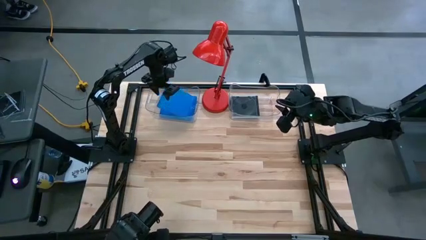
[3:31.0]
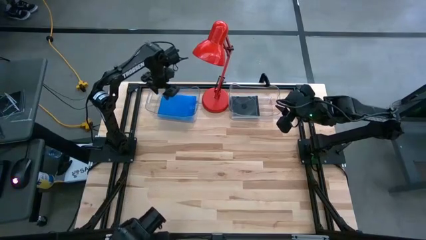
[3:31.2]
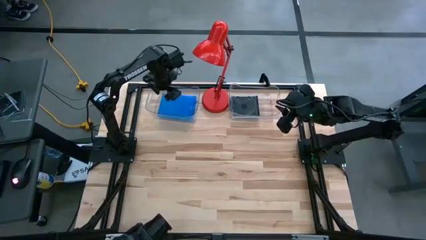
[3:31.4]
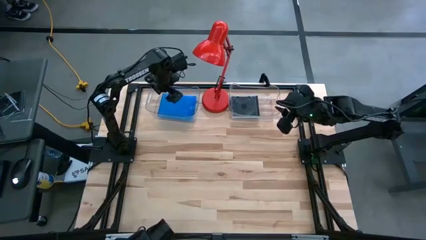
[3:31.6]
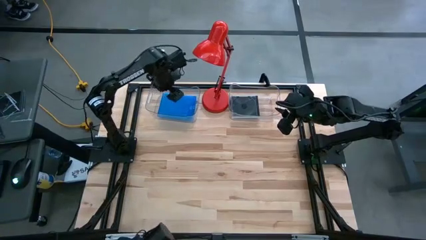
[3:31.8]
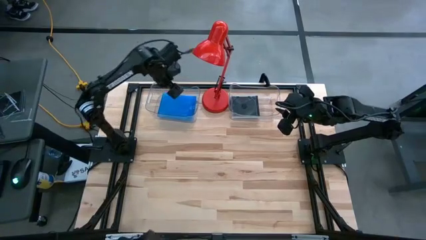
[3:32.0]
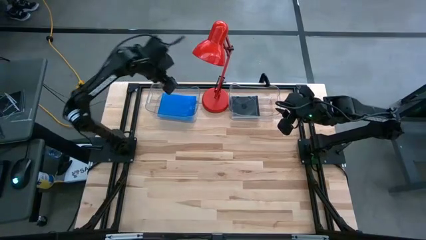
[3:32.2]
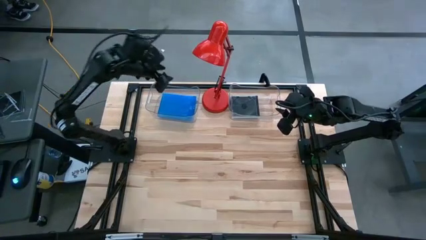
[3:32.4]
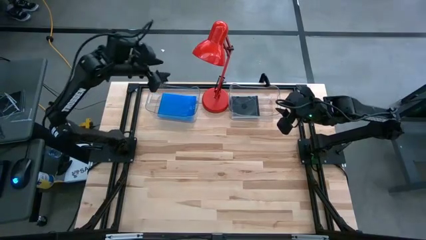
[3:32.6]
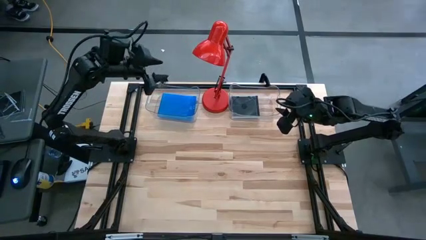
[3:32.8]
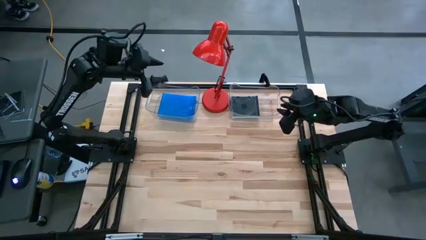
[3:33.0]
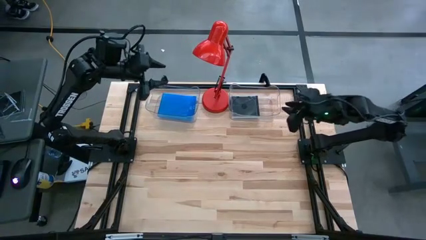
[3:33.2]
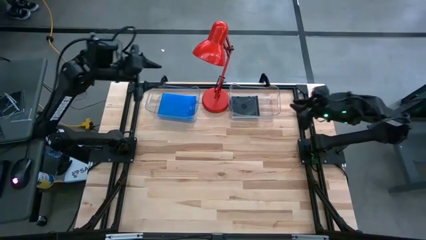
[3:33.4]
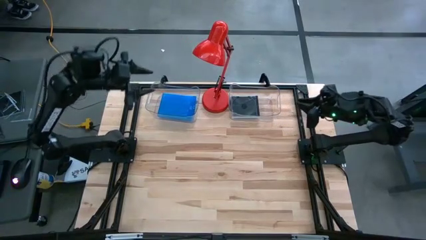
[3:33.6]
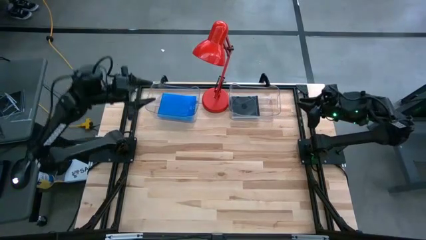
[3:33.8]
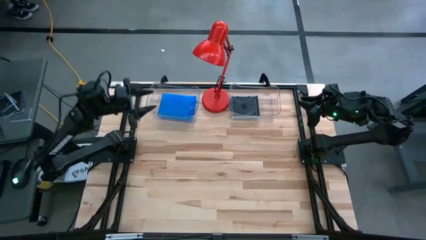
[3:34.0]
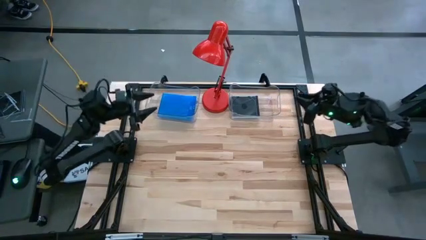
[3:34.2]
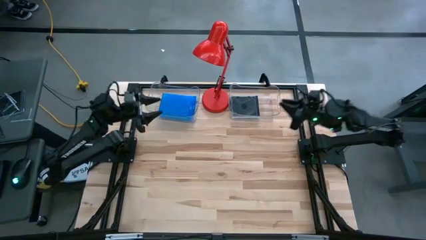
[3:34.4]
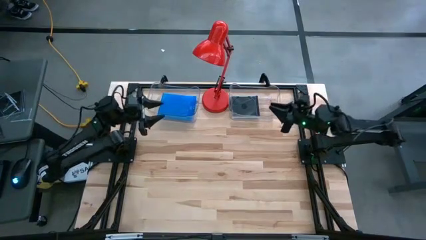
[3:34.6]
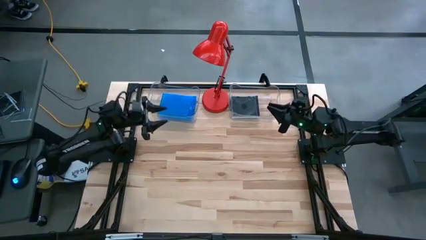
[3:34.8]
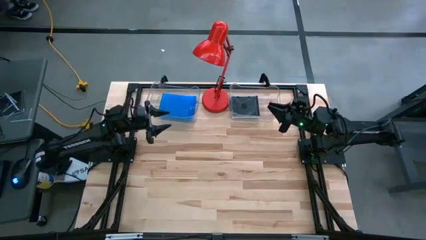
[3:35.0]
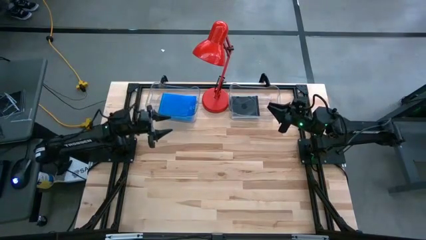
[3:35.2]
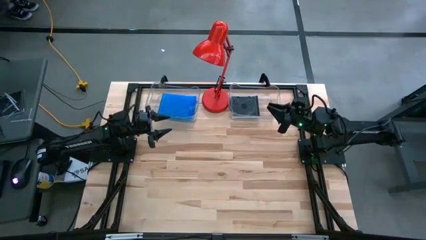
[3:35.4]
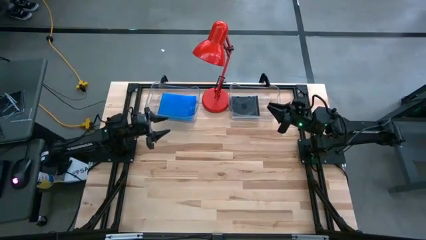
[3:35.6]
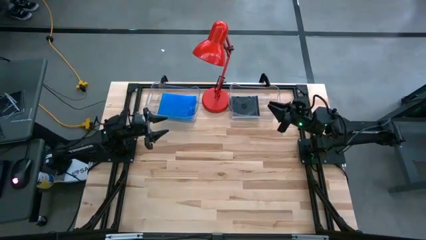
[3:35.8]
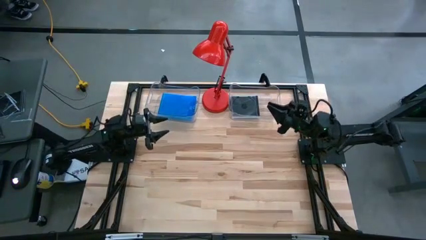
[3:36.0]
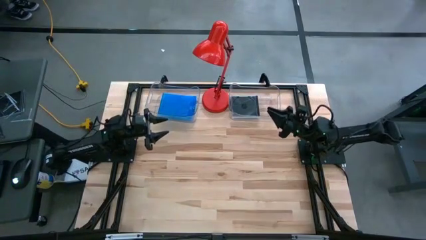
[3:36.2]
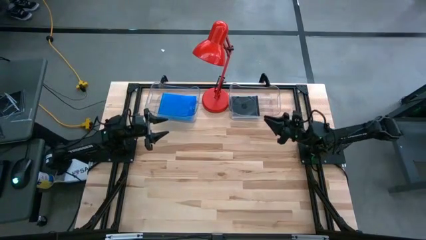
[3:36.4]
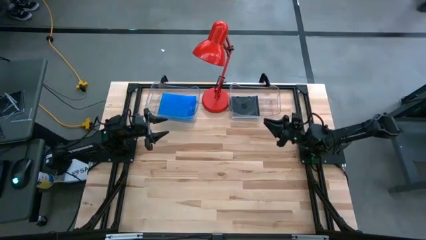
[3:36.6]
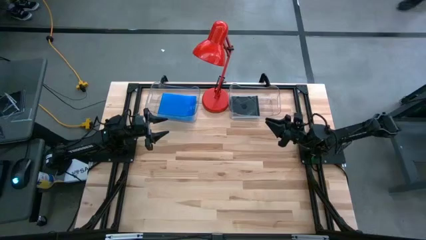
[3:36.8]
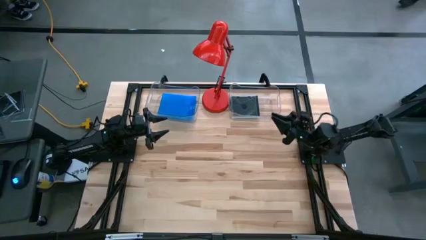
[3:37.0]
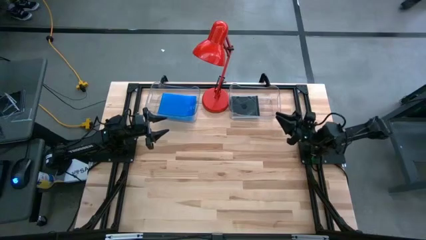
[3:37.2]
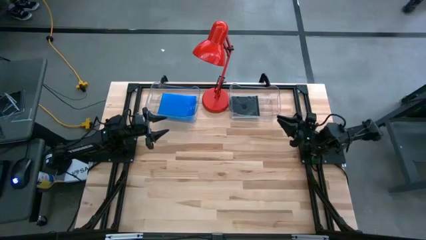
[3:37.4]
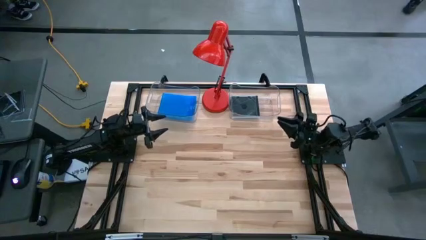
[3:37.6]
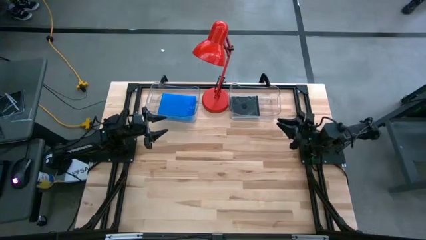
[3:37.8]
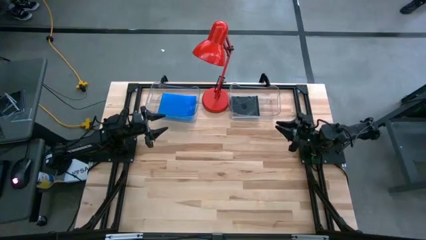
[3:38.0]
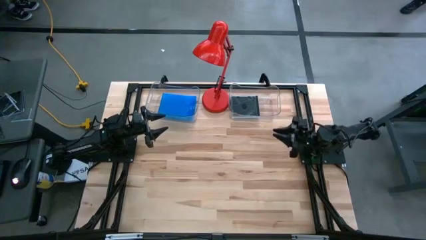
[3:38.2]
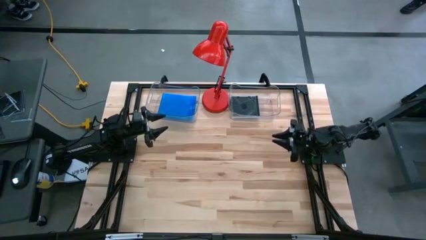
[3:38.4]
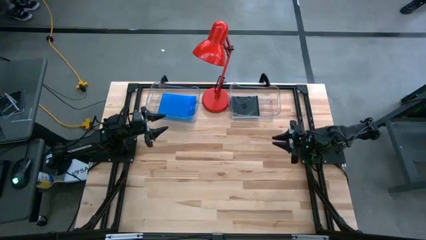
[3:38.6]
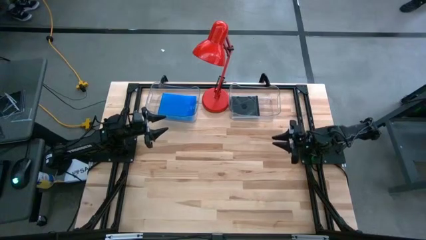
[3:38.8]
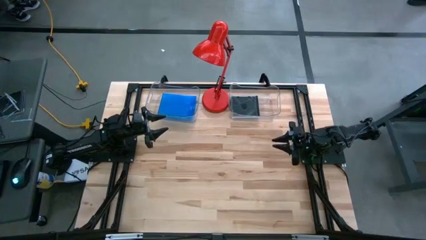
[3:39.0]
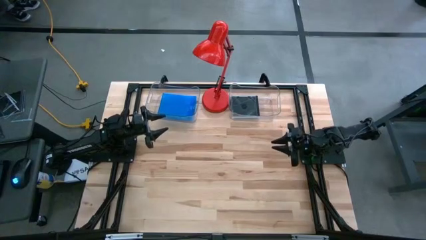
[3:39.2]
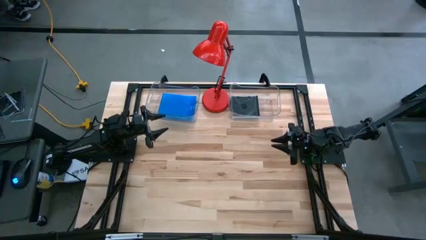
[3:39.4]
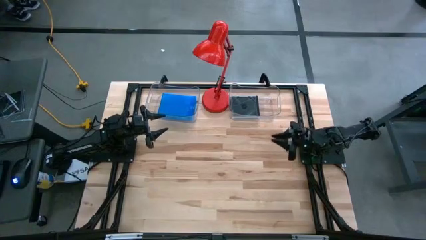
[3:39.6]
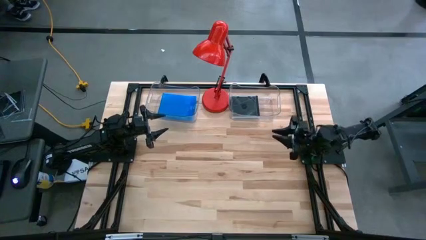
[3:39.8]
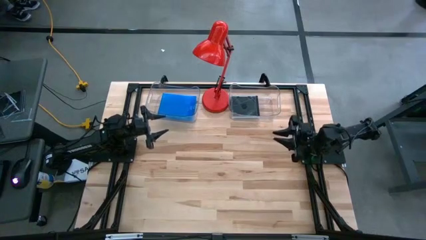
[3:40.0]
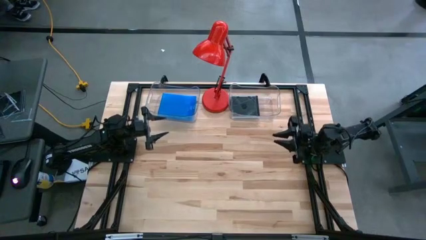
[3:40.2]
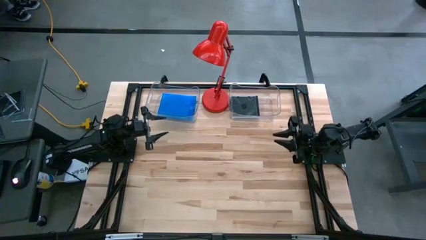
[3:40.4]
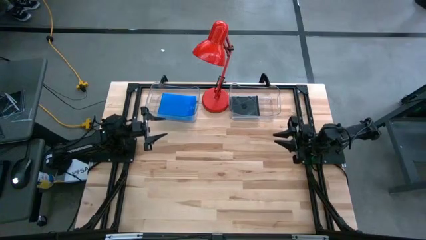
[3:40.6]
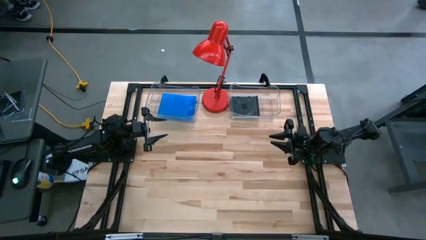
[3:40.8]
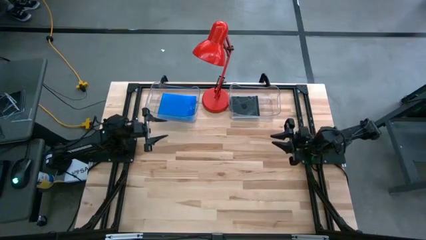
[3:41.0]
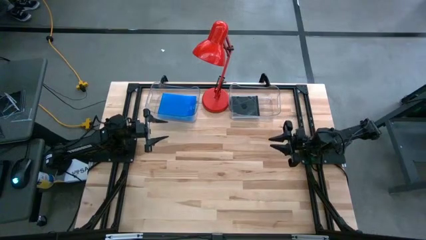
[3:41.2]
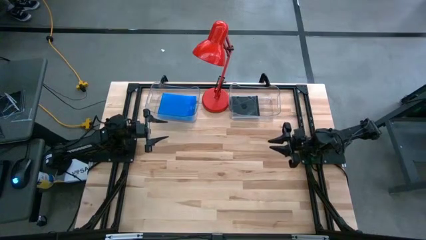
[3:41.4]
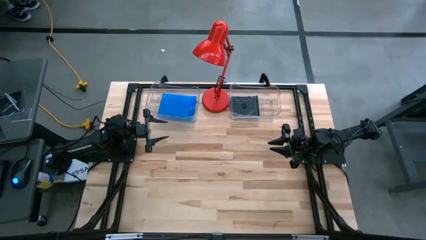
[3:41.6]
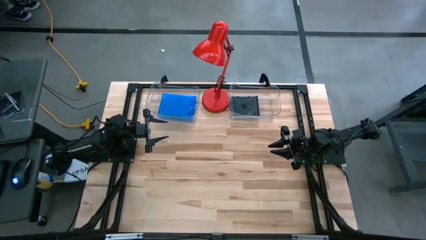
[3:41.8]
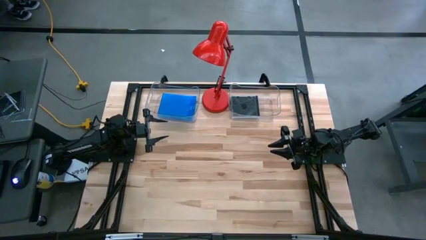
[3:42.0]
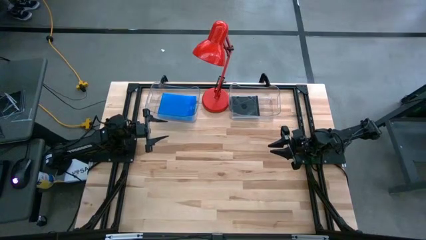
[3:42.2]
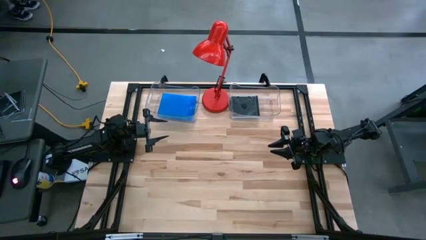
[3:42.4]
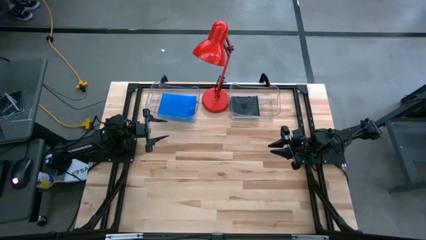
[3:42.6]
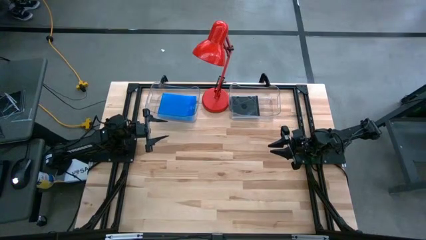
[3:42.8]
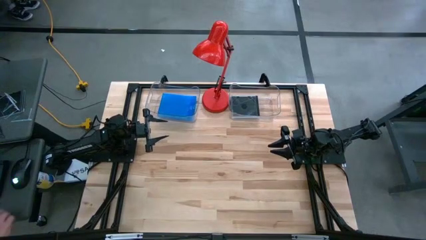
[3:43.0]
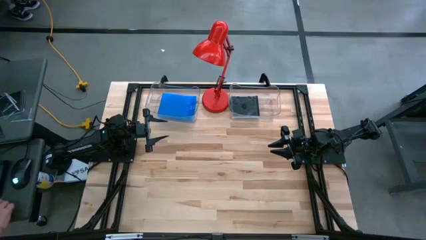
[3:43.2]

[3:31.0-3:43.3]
Task: Pick & place jewel cases by type
Return to Home Position

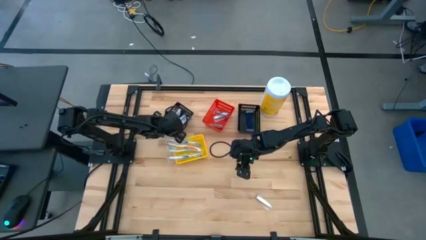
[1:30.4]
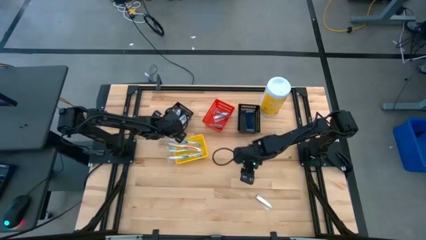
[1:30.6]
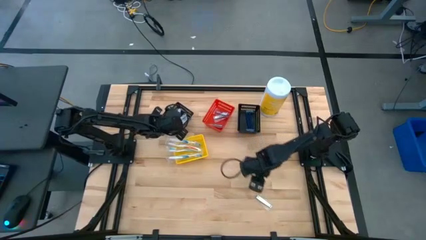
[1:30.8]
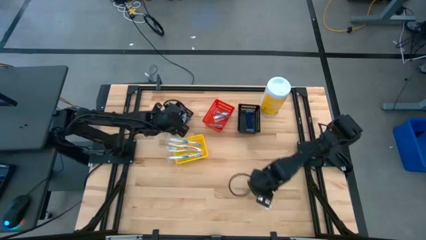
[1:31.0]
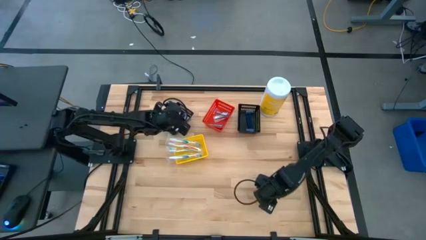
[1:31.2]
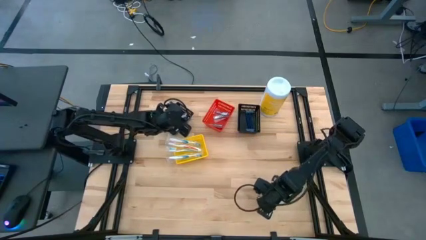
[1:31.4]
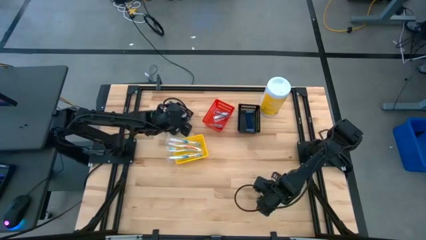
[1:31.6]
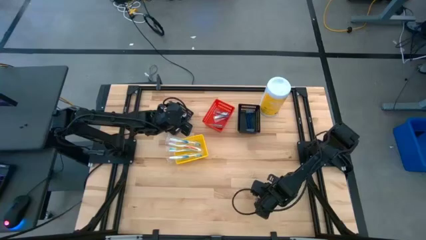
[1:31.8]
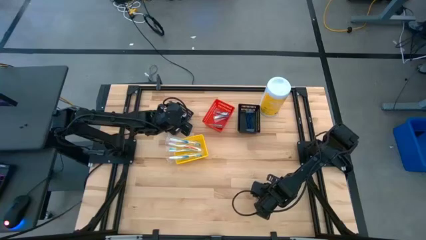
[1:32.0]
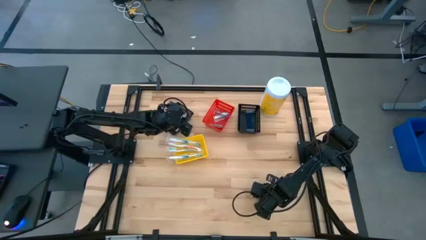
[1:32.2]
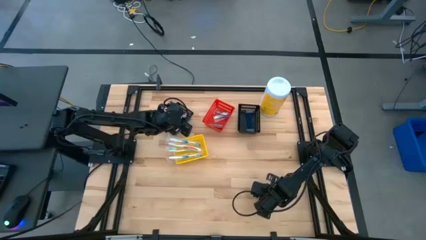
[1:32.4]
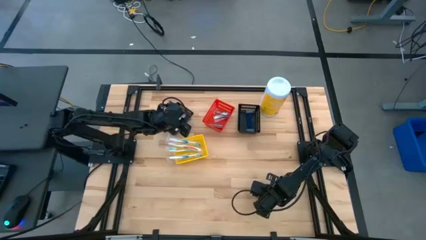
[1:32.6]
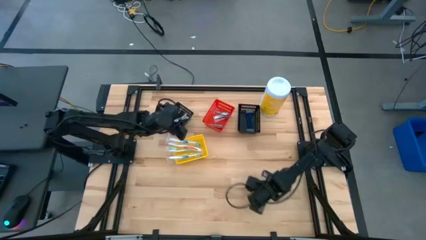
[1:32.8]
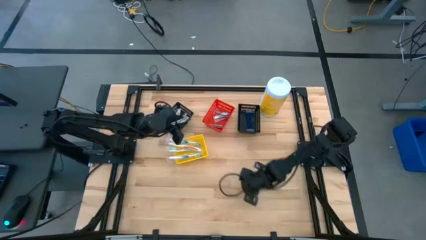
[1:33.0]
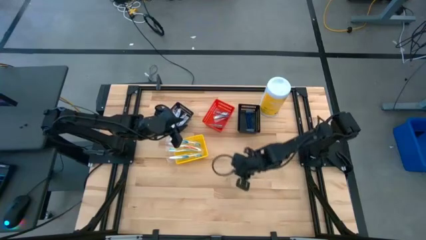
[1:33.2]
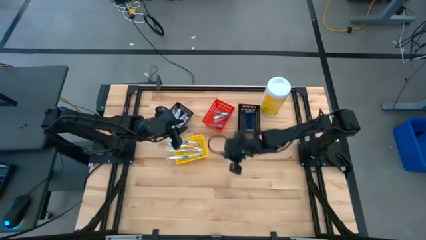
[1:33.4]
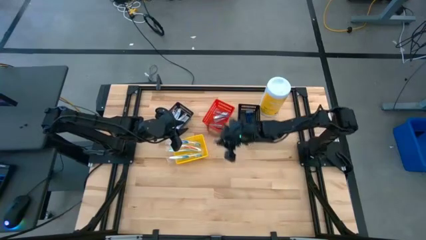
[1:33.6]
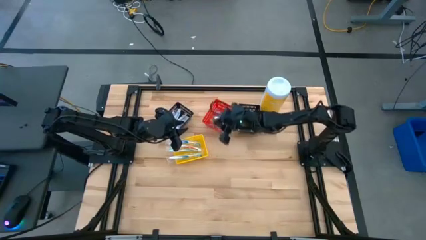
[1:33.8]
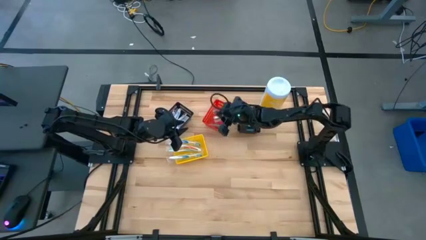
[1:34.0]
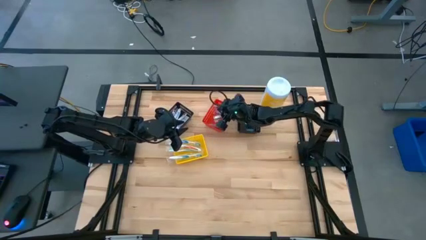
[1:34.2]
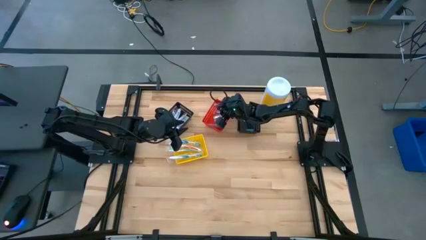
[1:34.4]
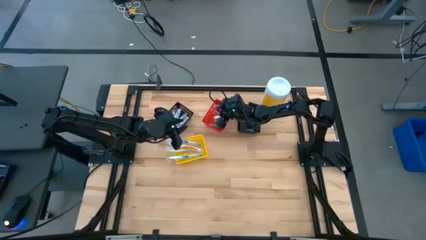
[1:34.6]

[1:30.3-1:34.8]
Task: Pick & Place Travel size toiletries
Put the silver nail cutter into the red bin
